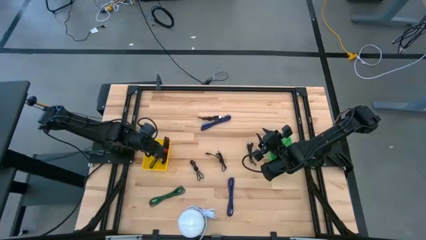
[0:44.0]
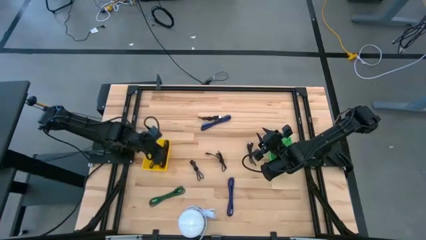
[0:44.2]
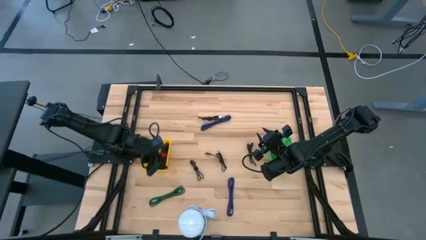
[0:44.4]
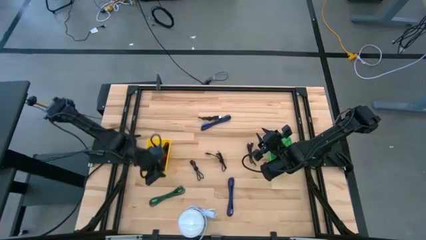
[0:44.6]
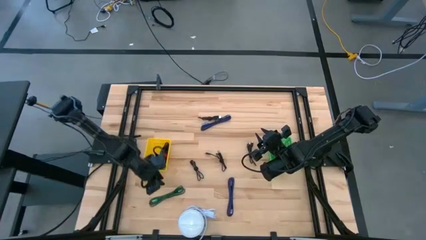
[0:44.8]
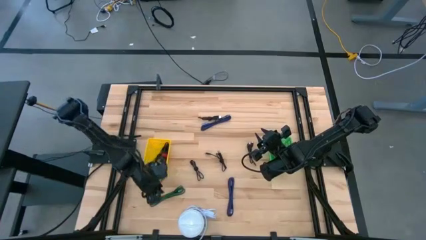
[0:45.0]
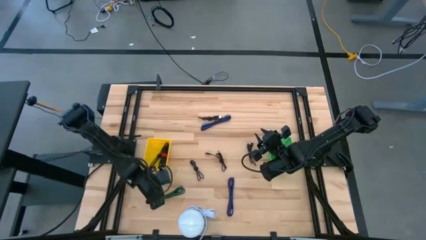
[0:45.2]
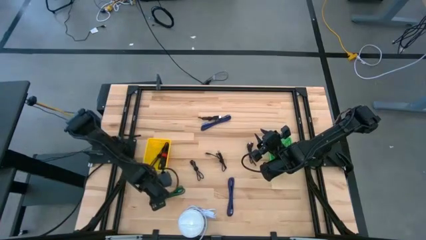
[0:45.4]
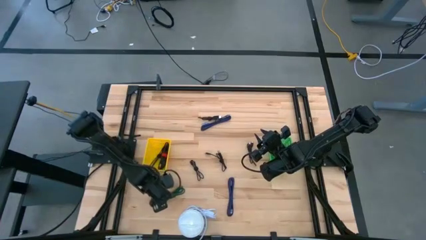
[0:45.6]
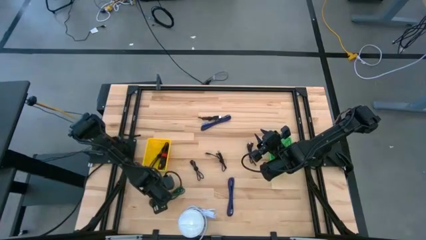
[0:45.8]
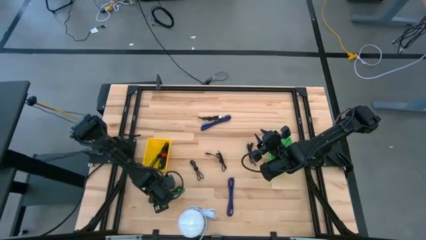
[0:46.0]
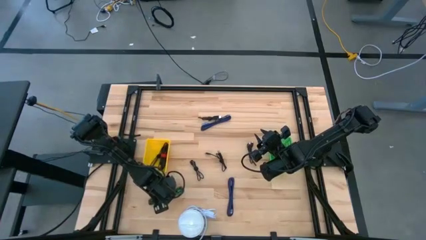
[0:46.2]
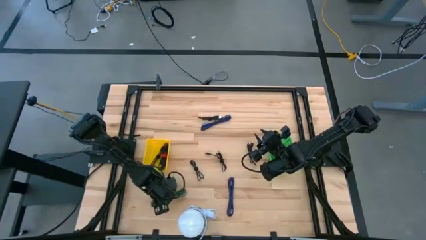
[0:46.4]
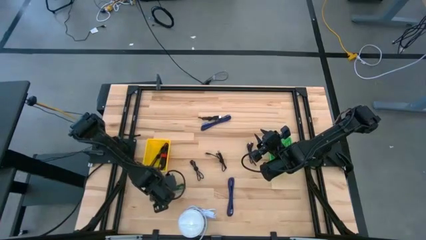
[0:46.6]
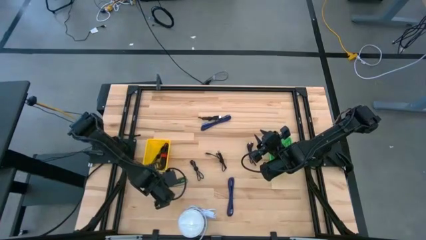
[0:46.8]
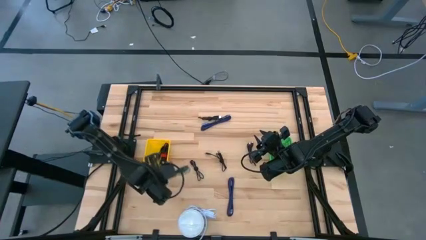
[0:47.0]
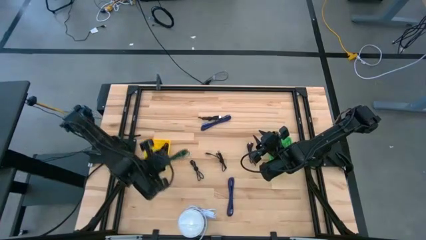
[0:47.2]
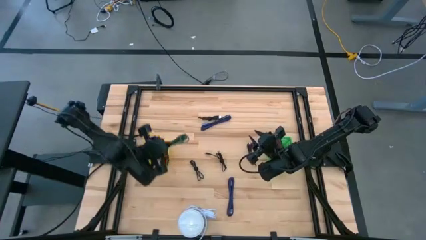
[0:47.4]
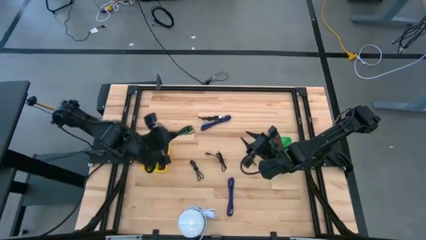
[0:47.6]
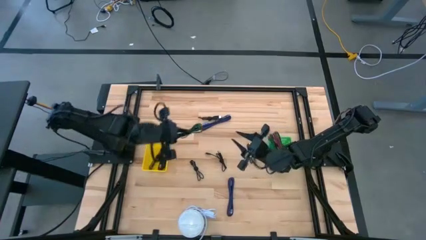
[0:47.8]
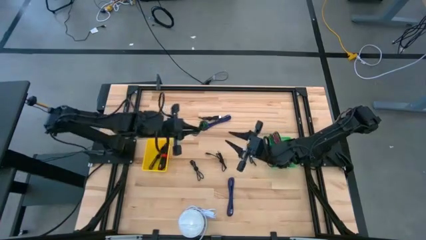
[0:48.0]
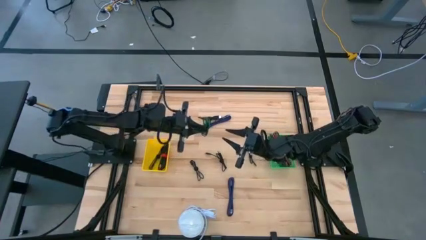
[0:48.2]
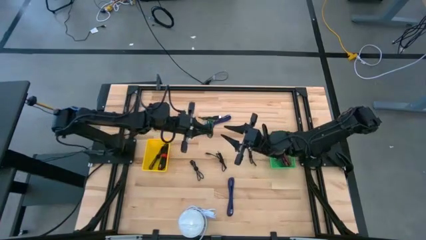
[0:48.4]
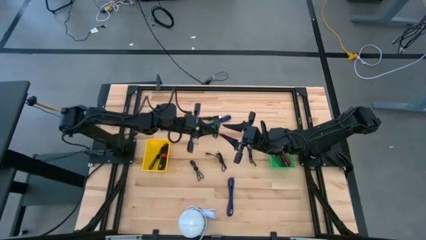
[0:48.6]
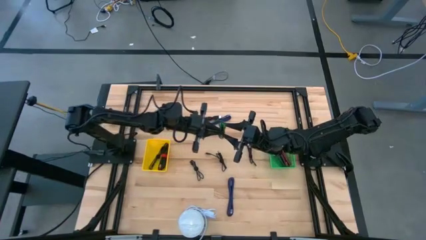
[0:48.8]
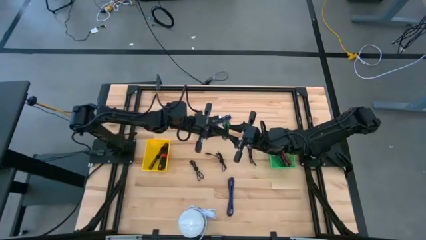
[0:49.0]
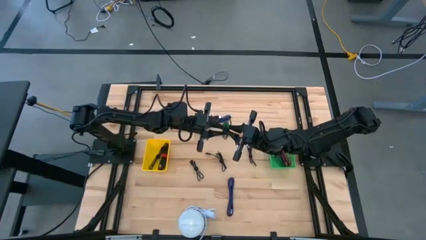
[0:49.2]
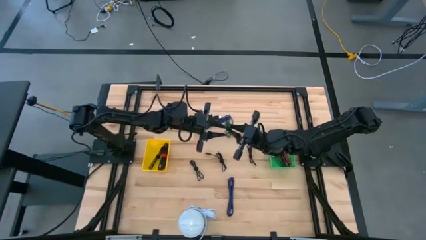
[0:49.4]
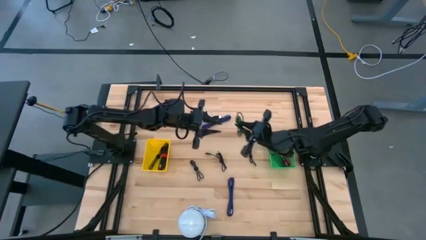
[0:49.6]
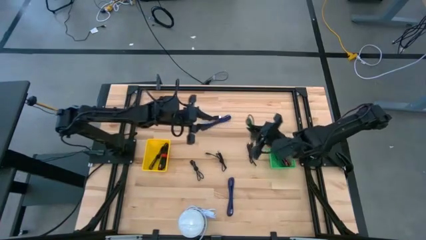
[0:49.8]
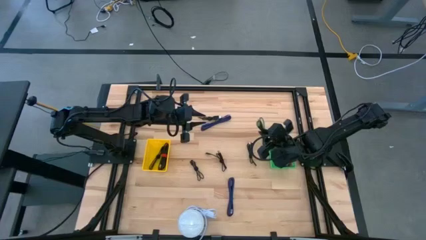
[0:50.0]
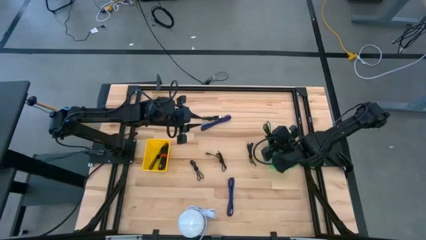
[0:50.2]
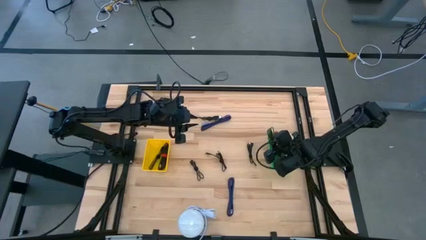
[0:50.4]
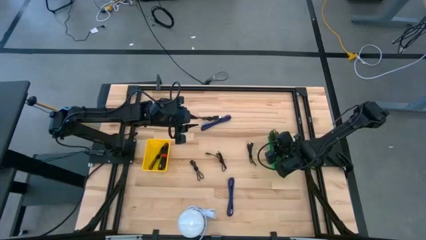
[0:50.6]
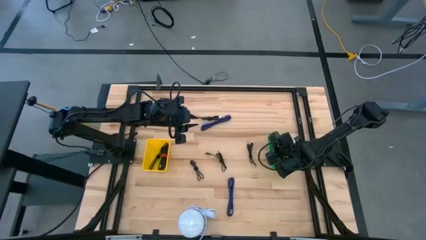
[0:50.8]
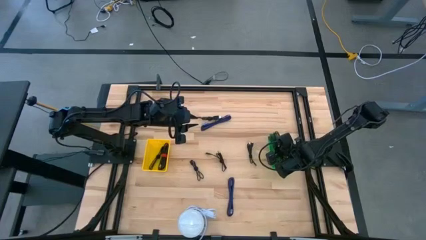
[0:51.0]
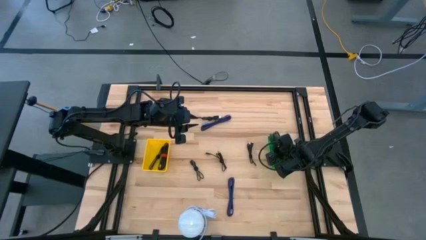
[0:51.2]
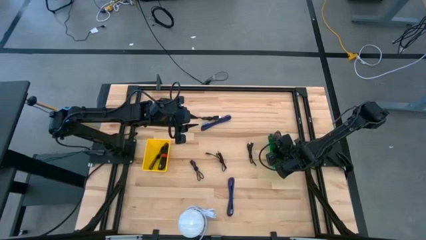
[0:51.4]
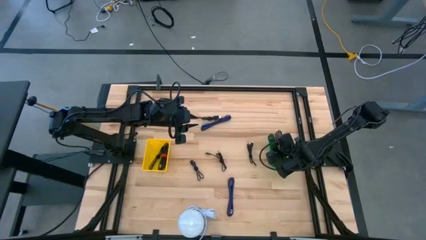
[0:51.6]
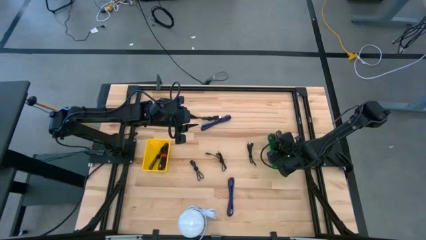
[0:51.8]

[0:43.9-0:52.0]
Task: Pick & Place USB Port
Put the black and green charger cable into the green basket

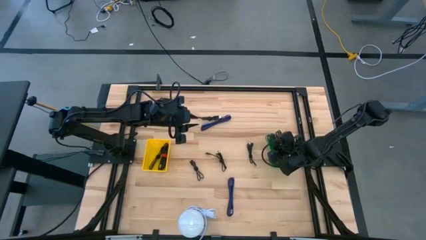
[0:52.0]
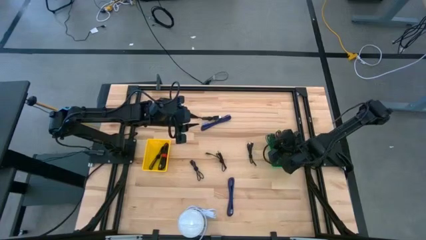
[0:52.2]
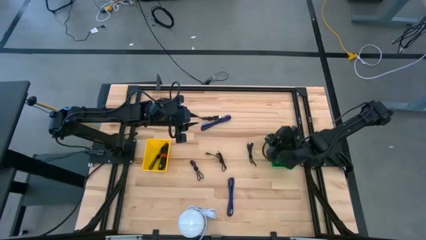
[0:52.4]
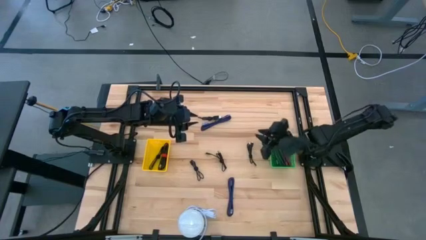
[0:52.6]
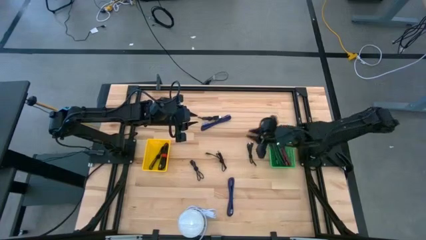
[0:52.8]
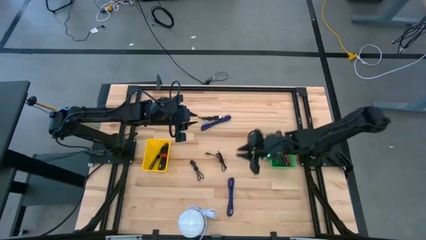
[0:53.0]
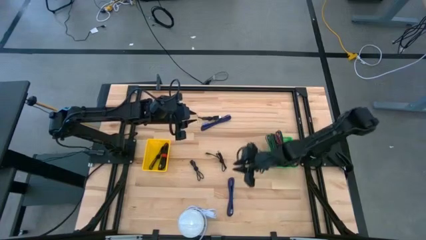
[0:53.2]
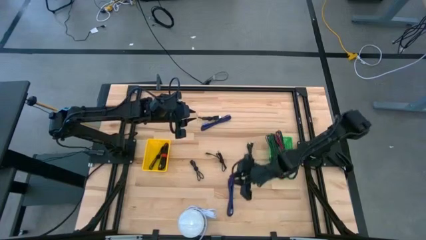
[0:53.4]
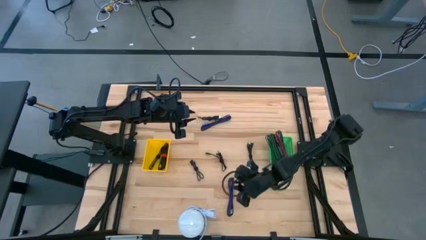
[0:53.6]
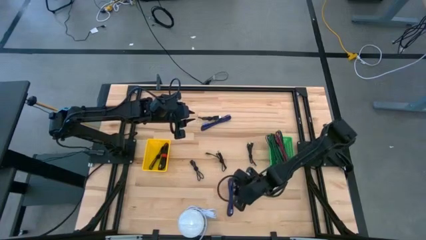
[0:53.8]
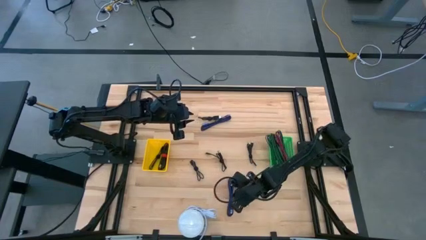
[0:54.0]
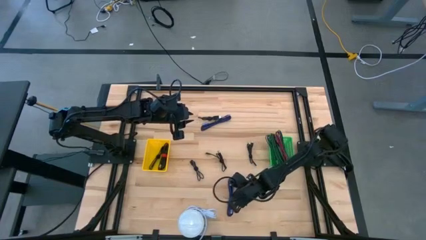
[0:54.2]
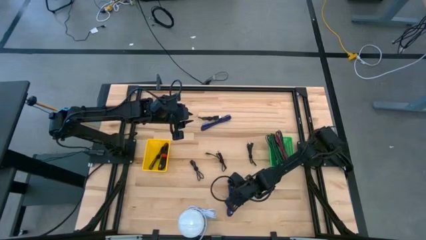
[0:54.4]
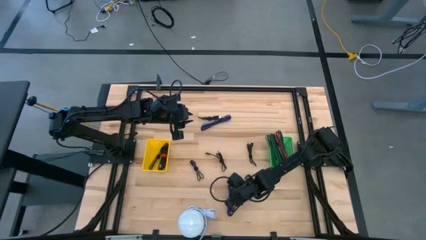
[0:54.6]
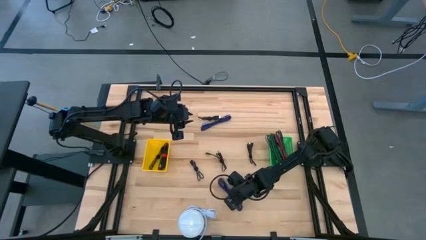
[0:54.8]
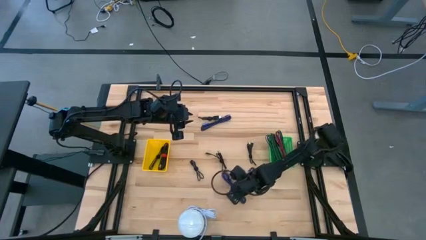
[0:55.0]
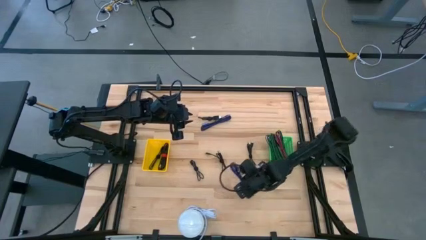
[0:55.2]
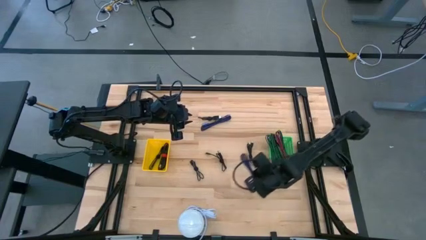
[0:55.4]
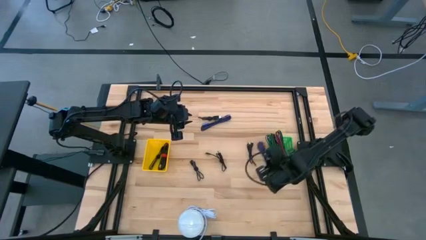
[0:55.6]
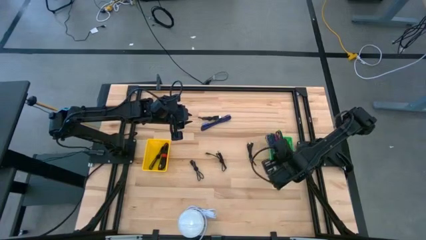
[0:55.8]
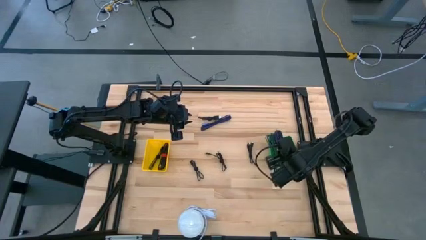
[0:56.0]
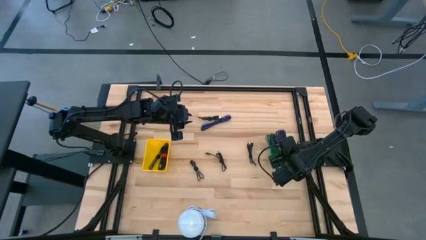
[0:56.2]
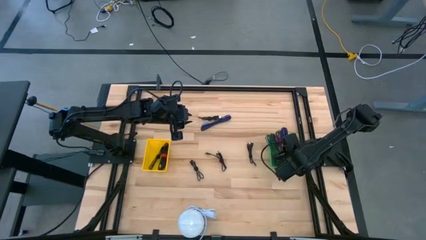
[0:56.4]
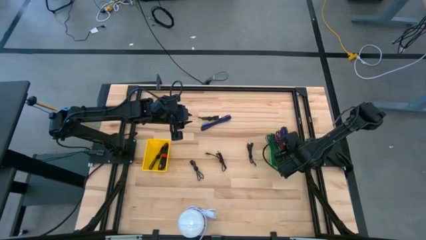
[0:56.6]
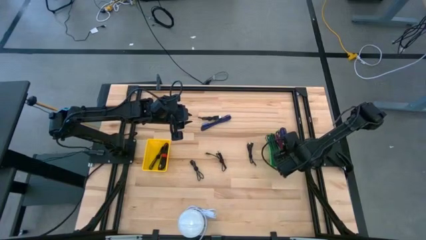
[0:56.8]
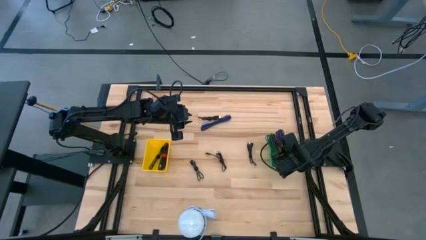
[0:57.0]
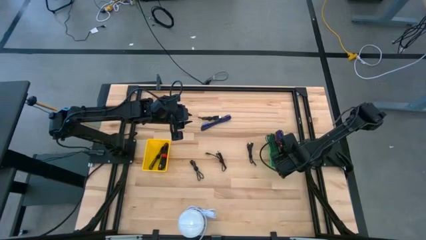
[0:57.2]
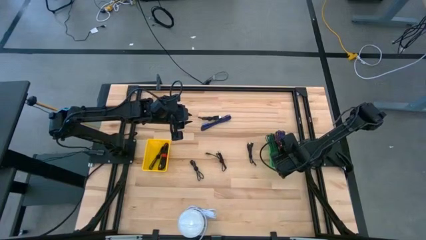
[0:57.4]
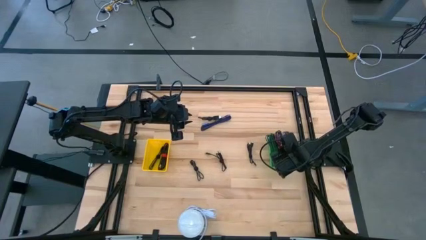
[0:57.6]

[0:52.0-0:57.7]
Put the black and blue charger cable into the green basket

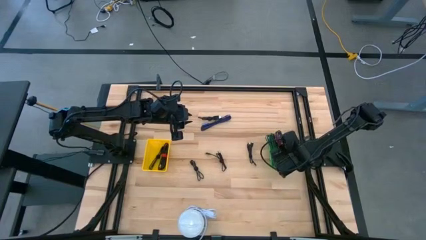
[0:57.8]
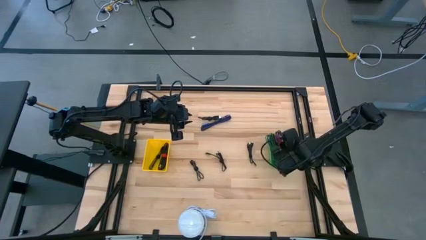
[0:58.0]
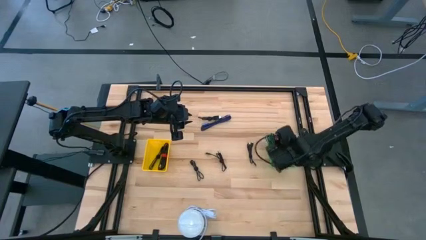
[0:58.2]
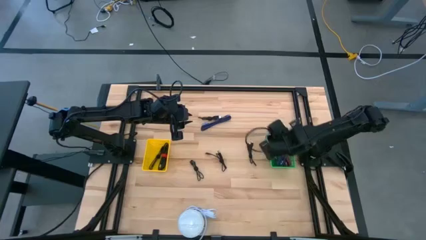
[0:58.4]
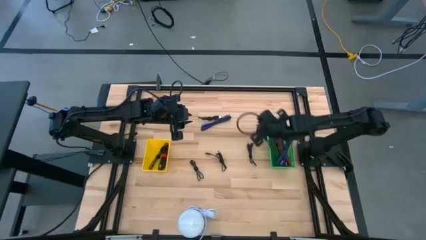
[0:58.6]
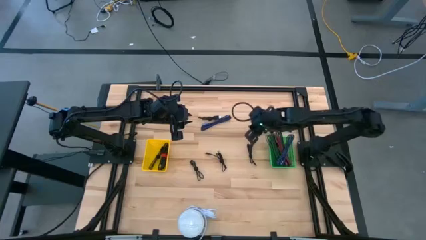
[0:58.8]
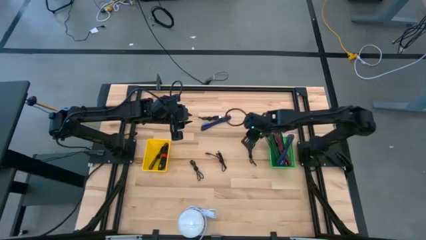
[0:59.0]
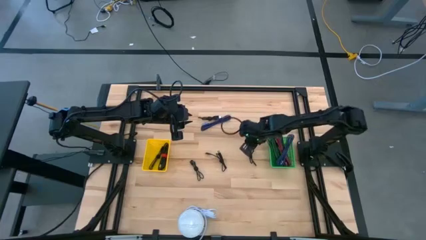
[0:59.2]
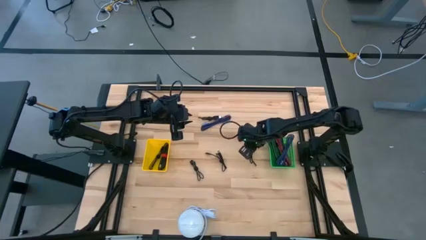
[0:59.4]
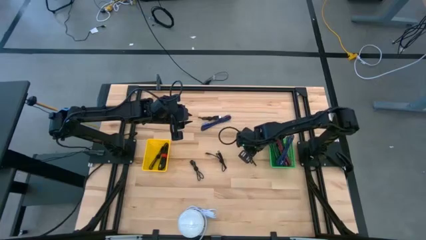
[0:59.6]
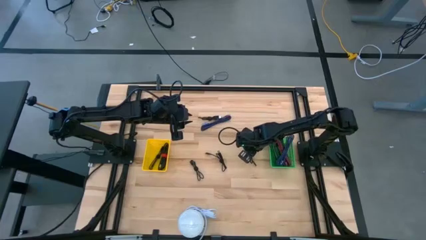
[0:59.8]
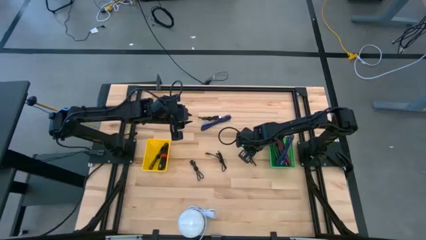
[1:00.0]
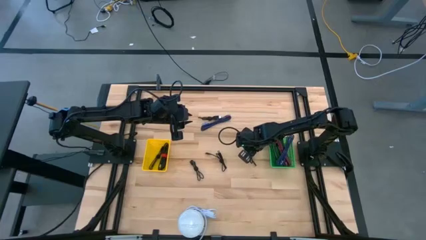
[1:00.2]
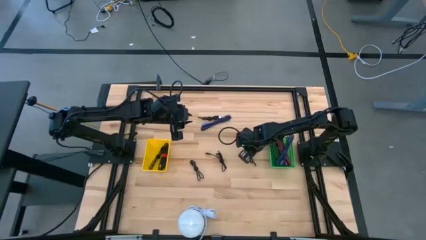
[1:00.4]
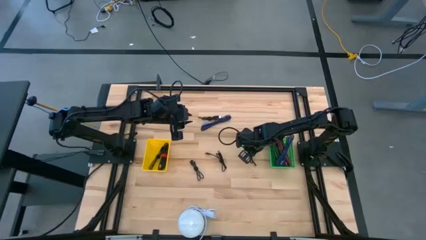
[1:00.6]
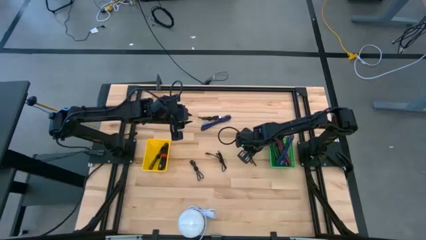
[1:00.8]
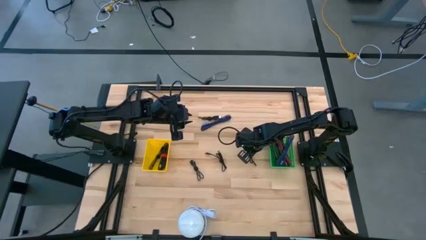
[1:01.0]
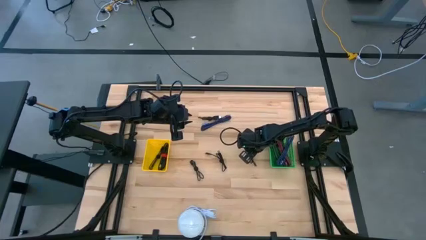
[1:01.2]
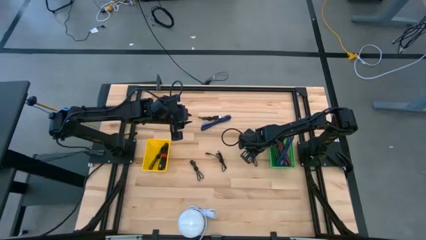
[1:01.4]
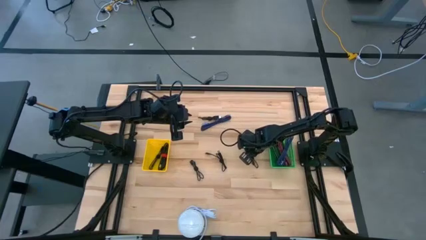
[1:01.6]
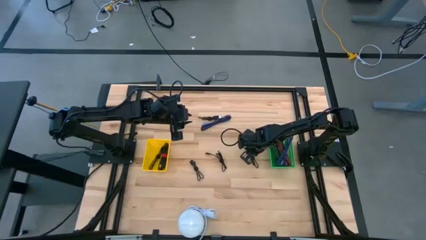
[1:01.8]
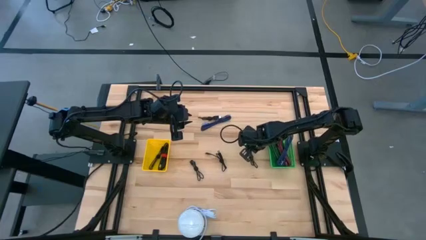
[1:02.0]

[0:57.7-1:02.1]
Put the black charger cable into the yellow basket
